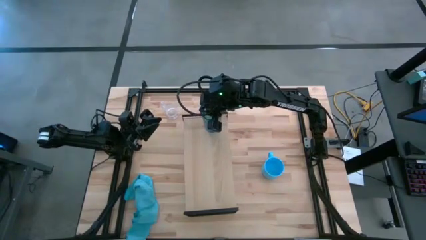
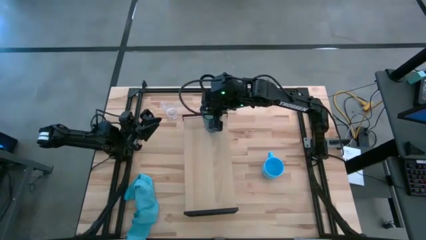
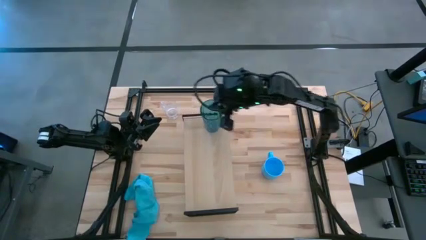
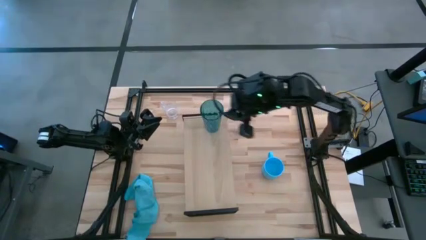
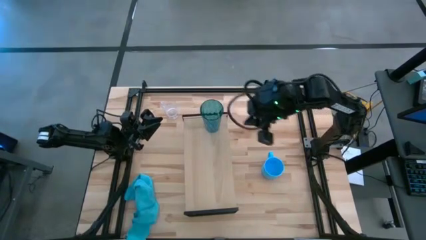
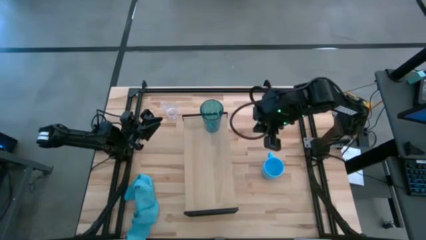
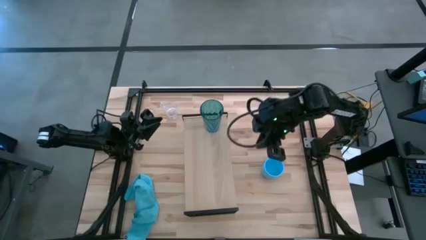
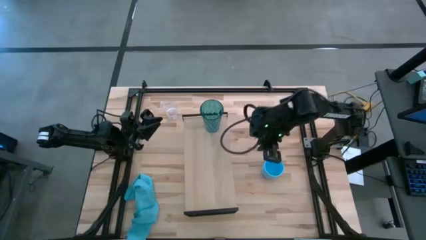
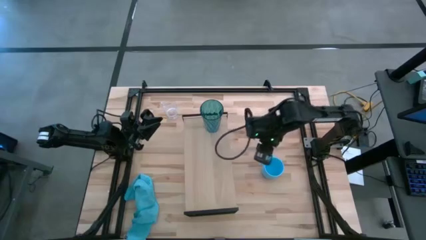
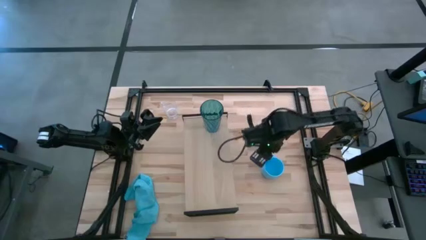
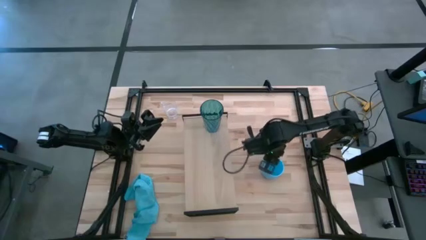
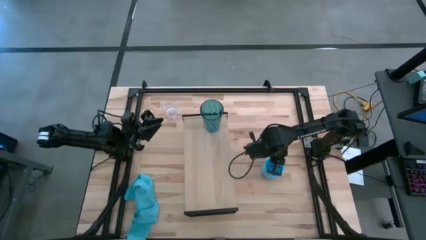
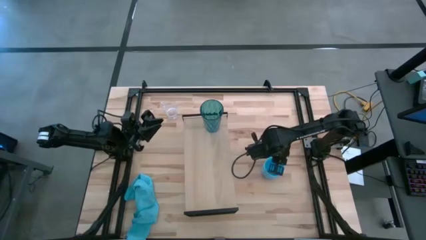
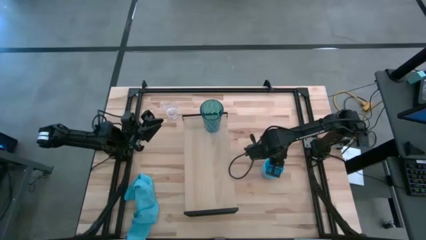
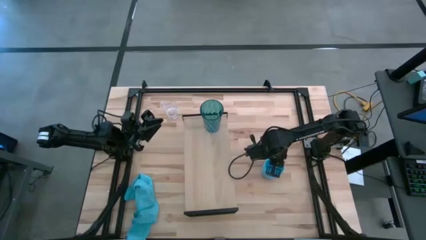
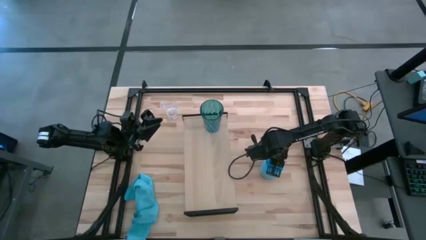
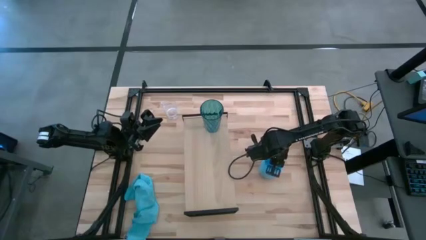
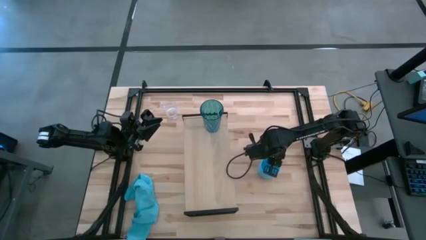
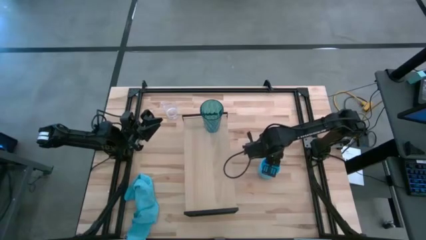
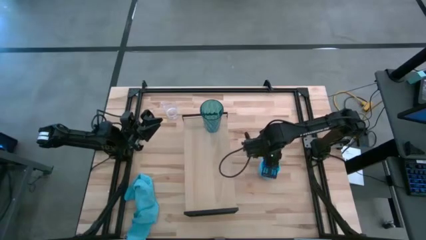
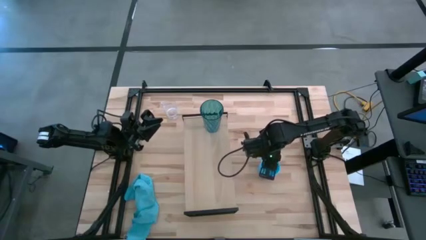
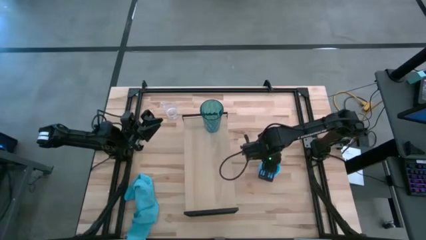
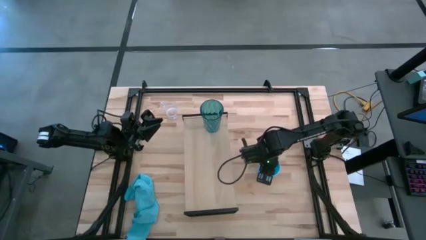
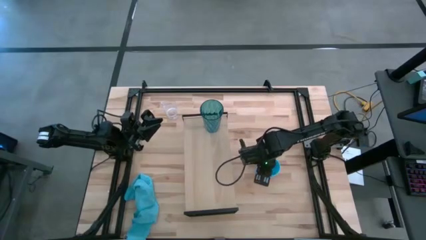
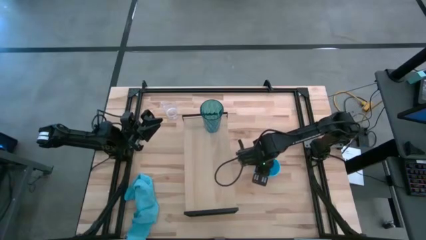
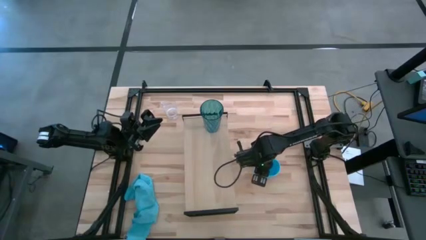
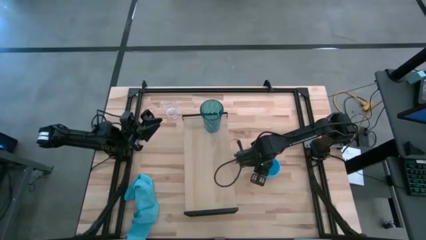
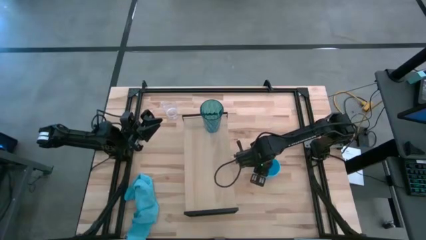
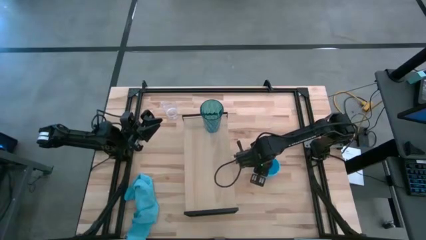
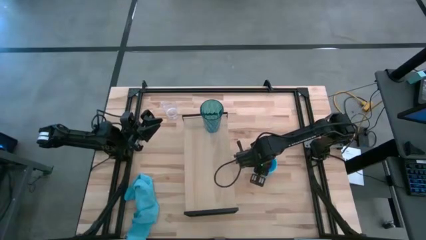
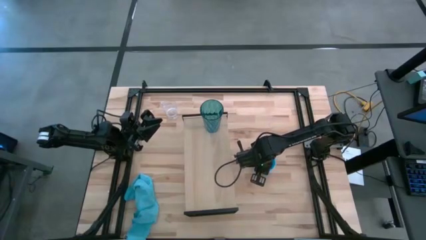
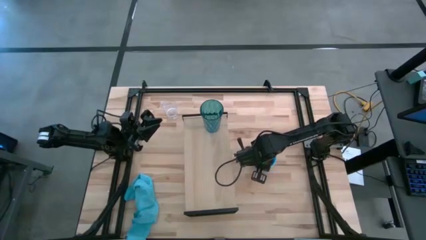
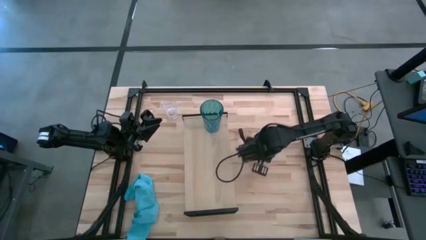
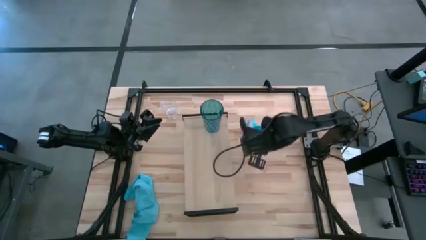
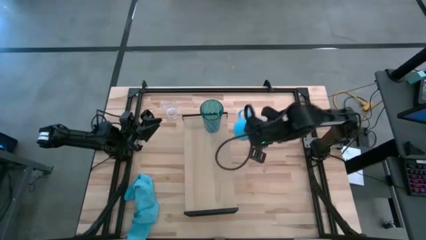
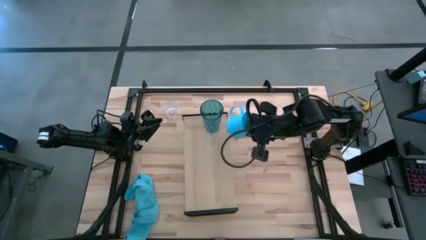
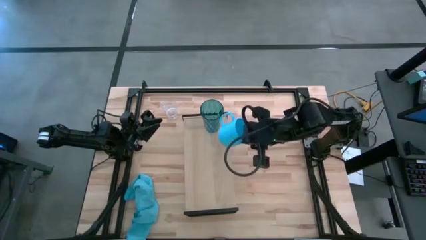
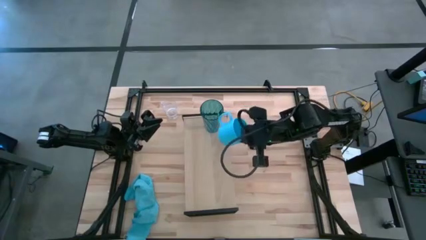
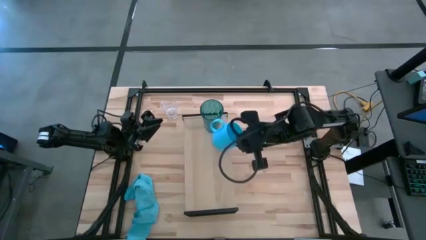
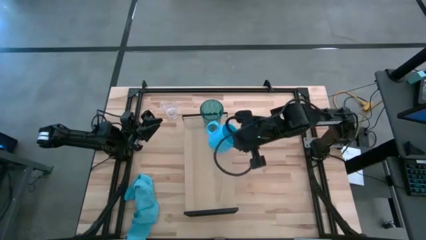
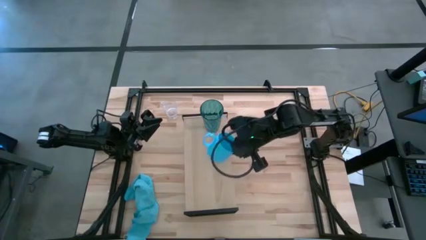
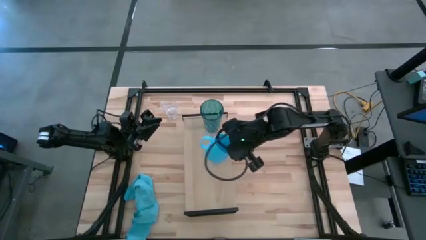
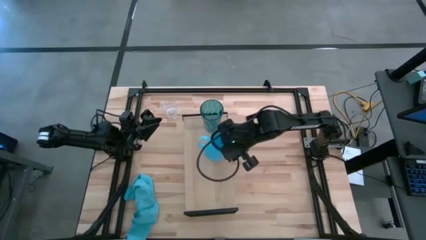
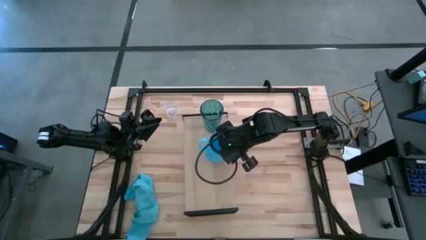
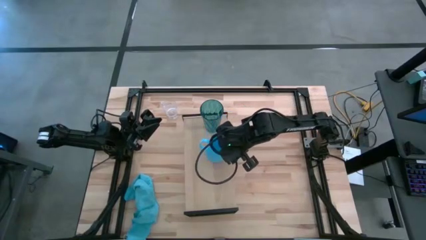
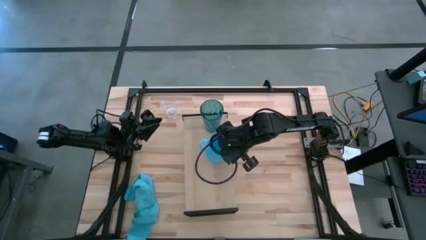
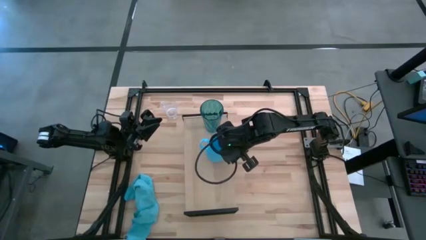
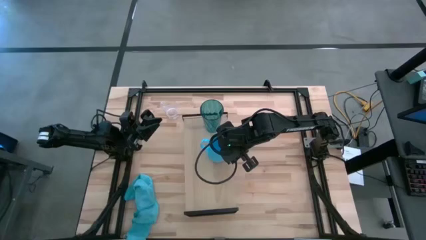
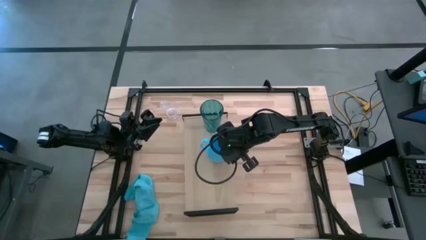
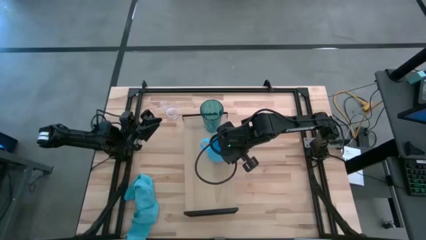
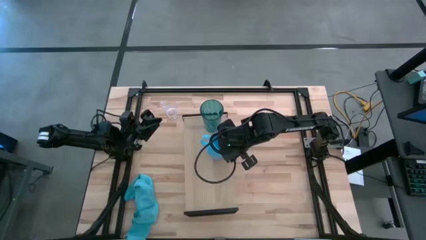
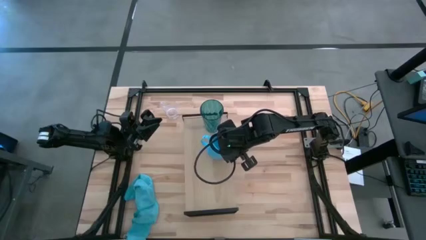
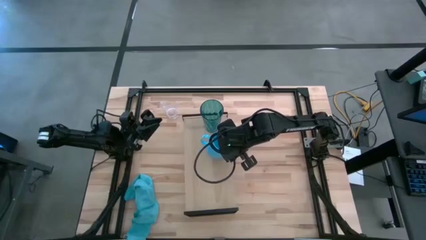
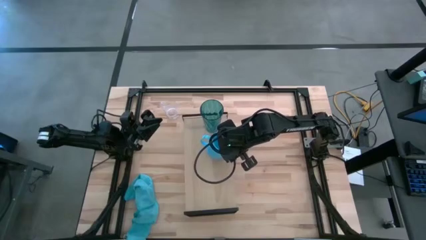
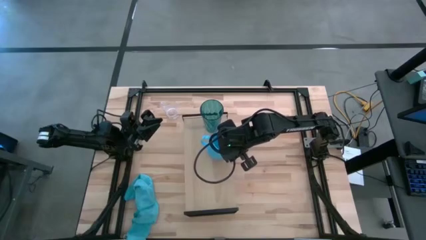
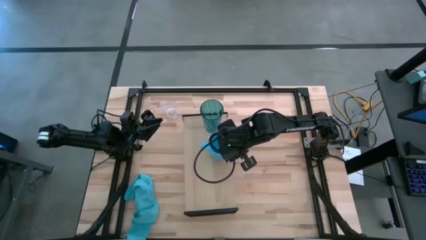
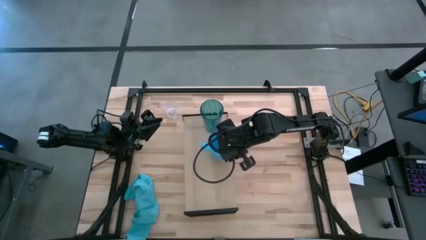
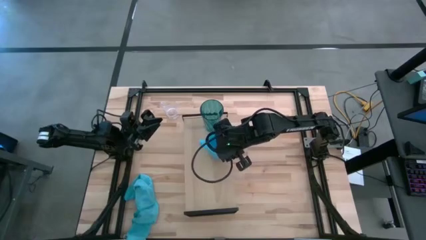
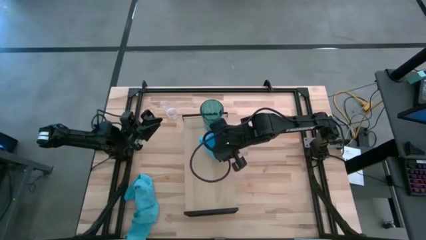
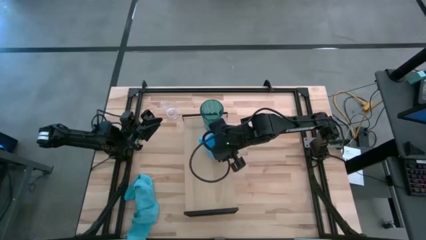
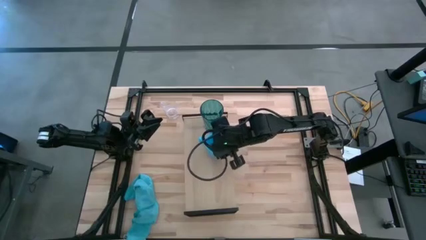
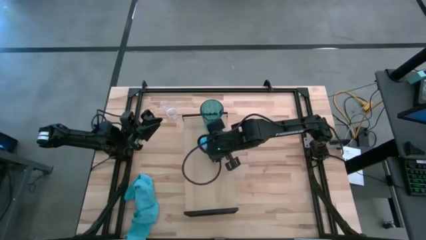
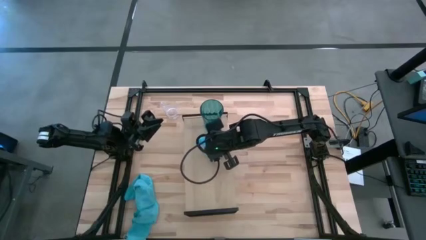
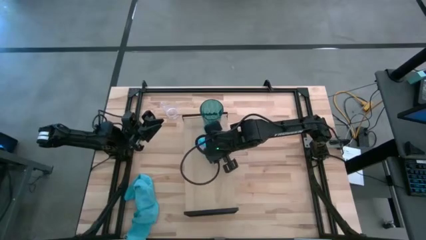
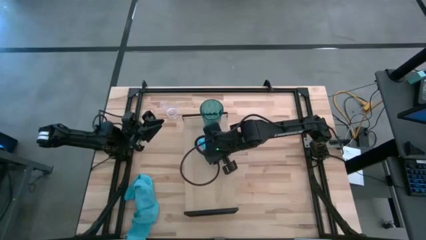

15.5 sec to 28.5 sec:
Task: Stack small to large cups/mugs on shelf
Put the light blue mug on the shelf
